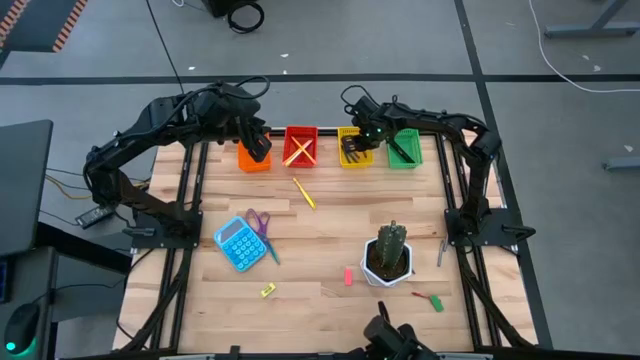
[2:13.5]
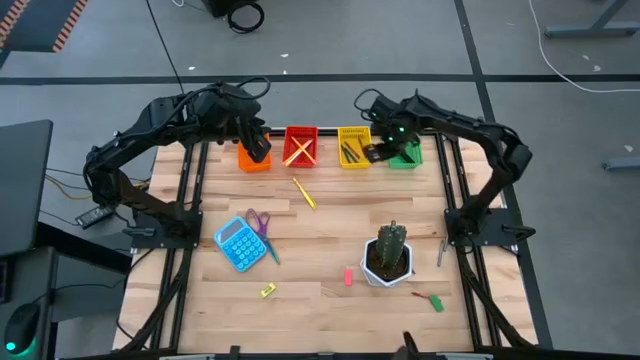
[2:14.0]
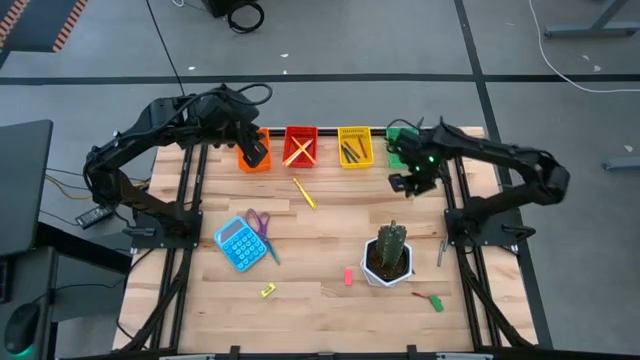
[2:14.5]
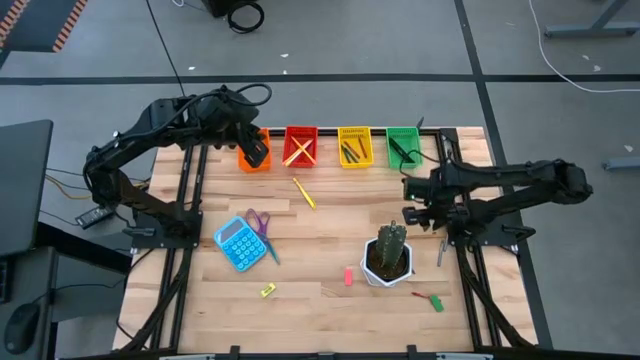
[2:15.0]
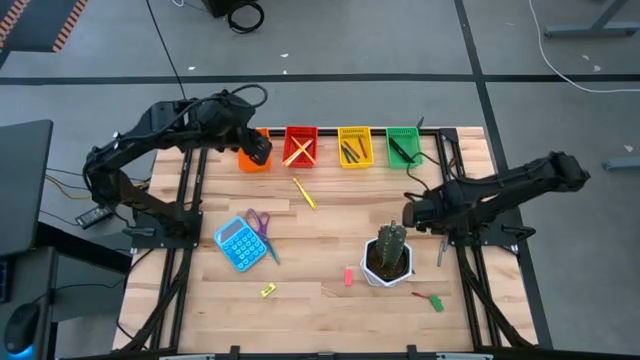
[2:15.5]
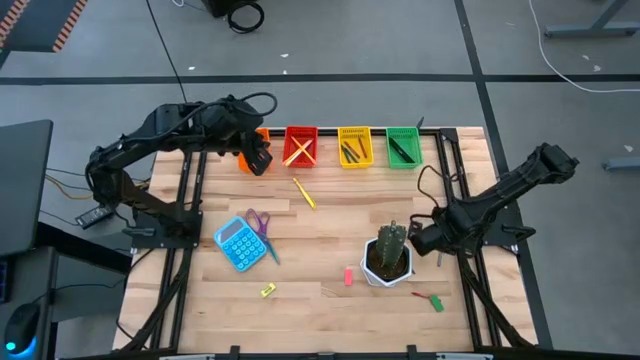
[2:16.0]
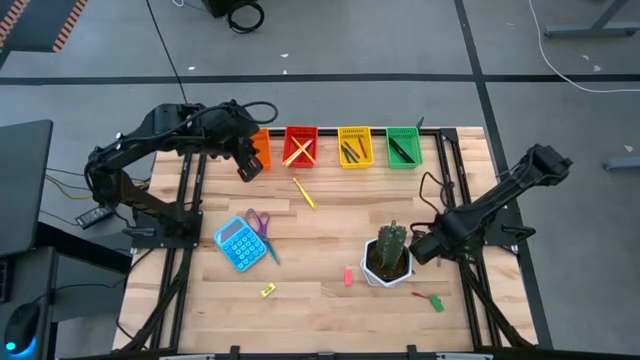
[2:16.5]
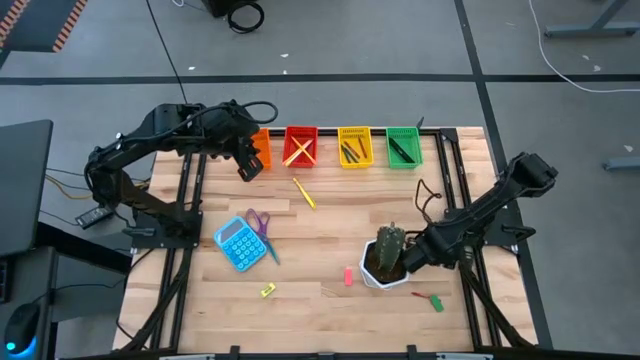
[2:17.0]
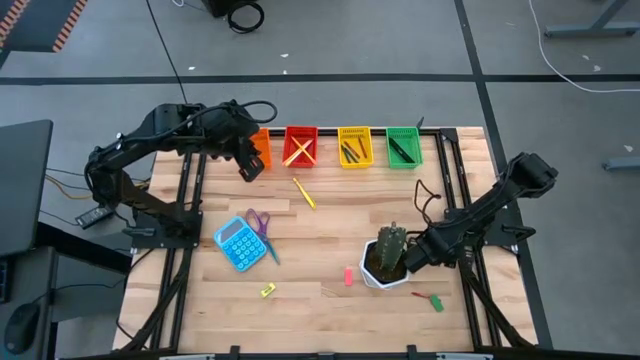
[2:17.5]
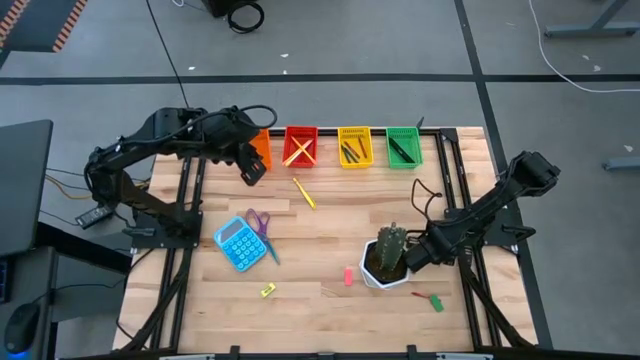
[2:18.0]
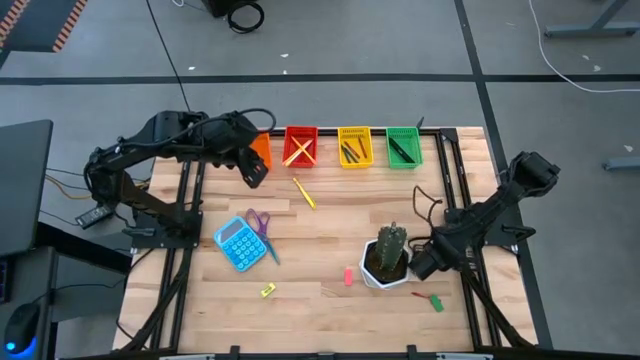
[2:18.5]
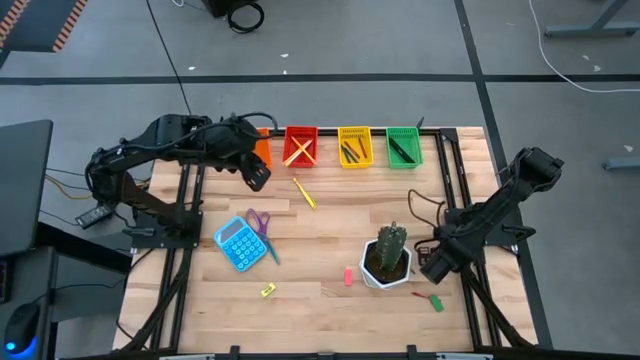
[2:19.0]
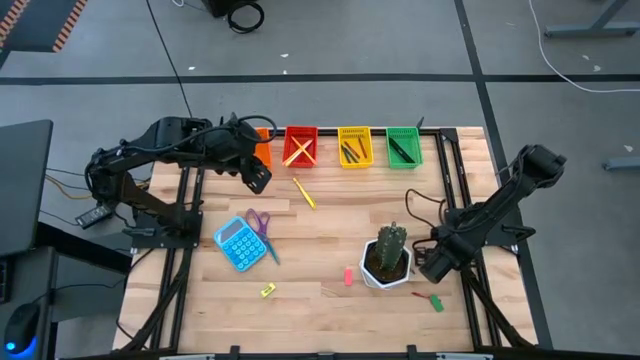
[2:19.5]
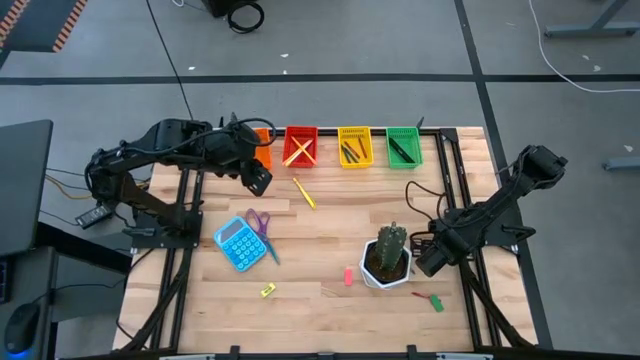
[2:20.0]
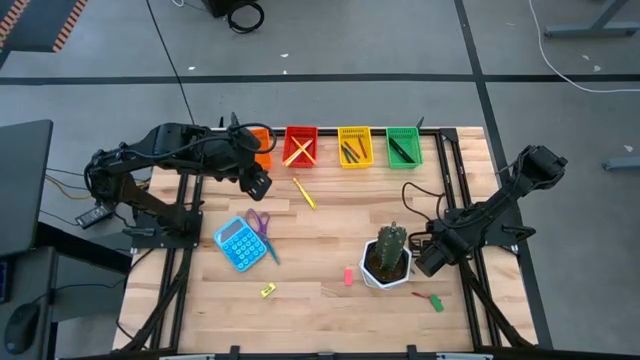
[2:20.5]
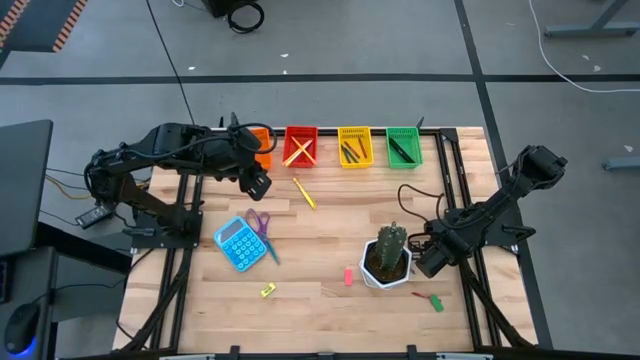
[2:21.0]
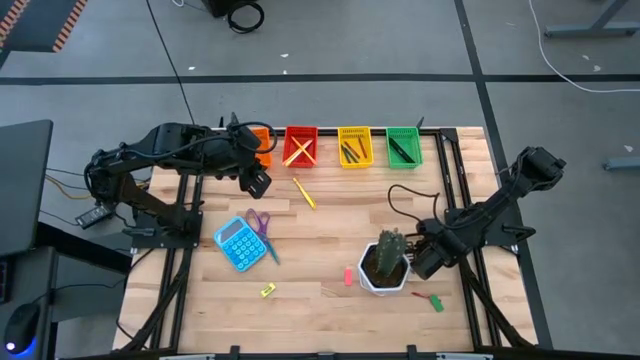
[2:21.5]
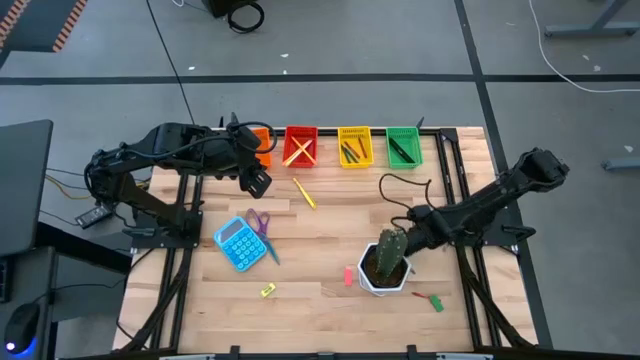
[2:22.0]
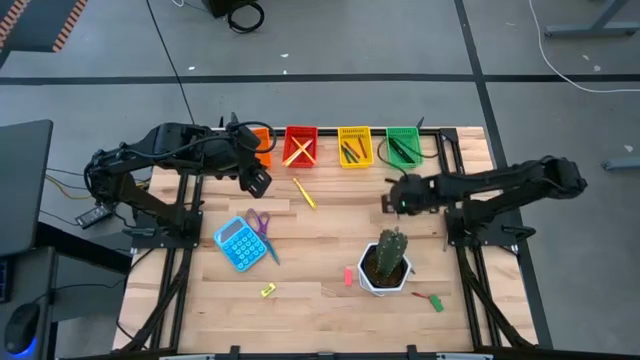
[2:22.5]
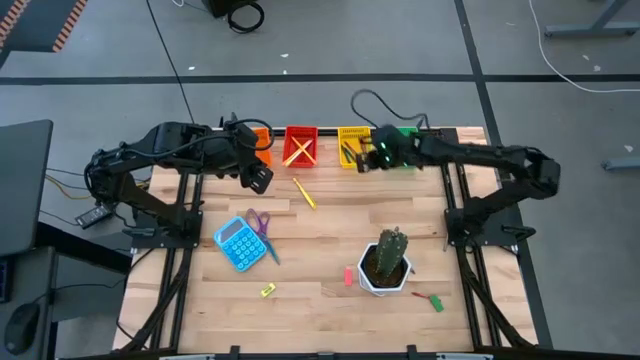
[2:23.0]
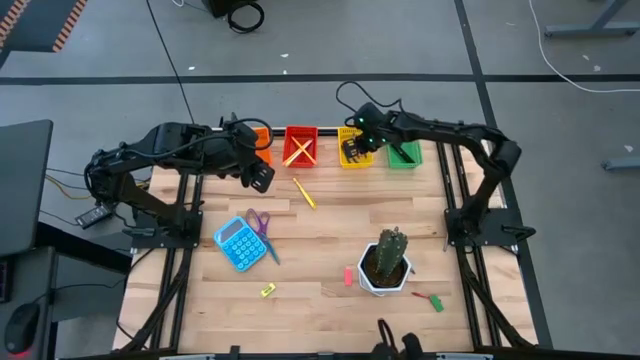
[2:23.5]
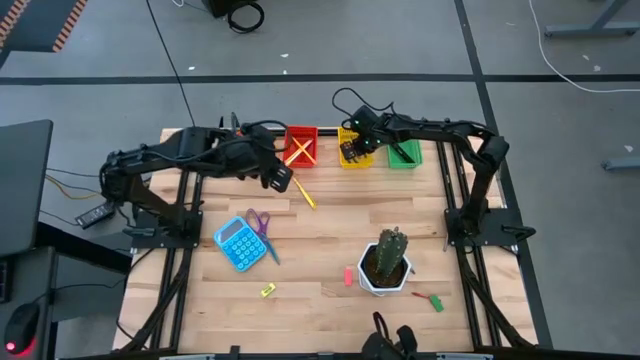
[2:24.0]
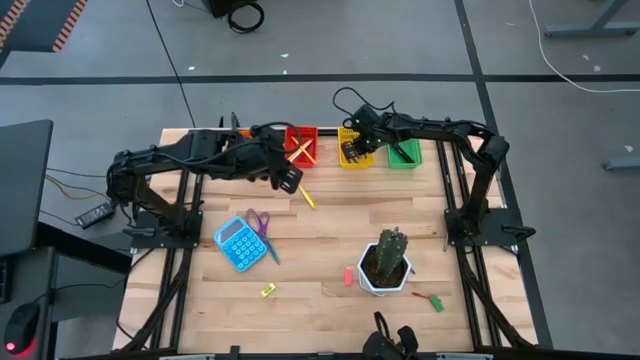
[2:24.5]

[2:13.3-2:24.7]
Task: Sort crayons/erasers/pens/pencils in bins
Put the middle gray crayon into the yellow bin

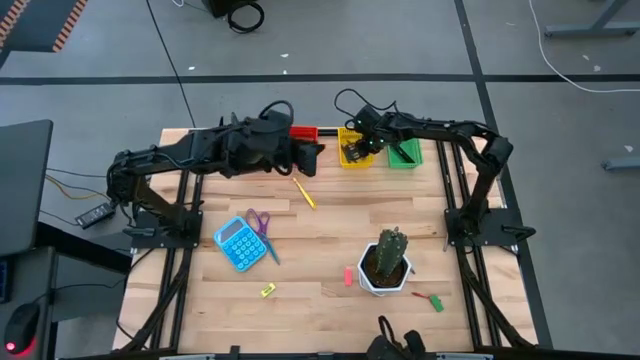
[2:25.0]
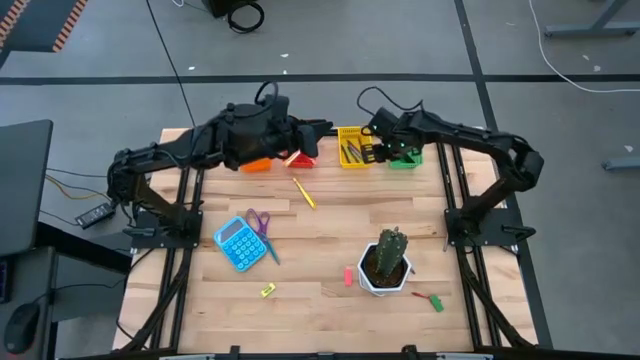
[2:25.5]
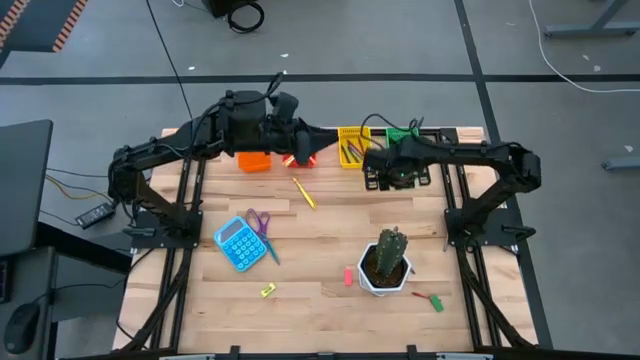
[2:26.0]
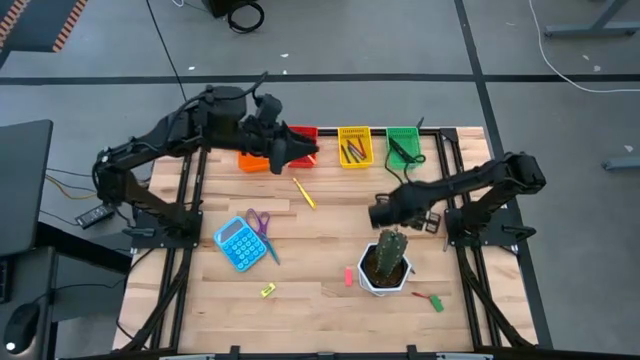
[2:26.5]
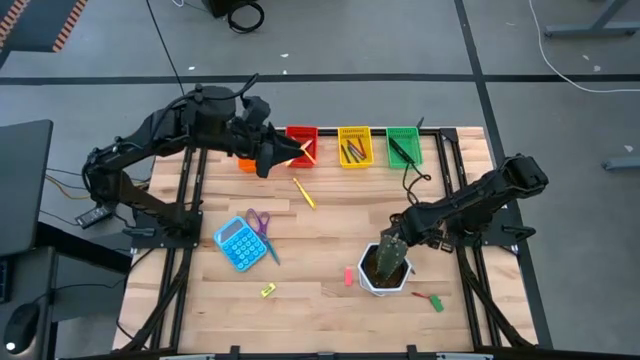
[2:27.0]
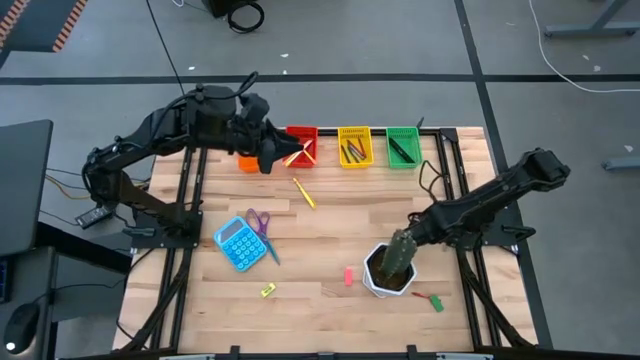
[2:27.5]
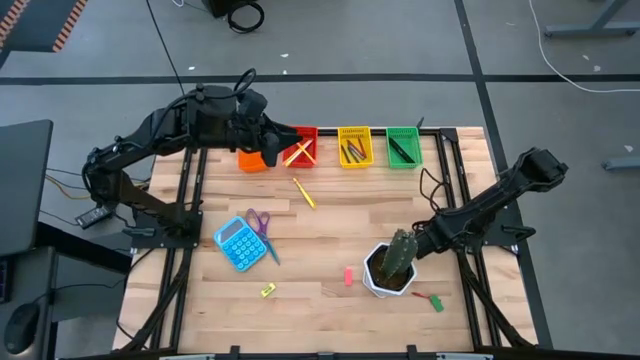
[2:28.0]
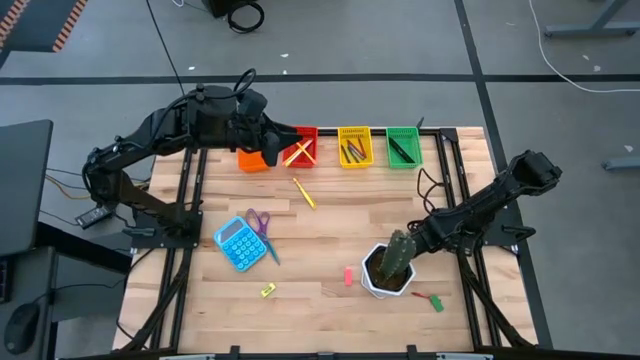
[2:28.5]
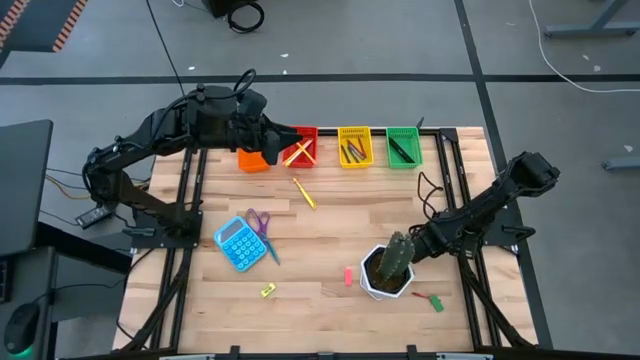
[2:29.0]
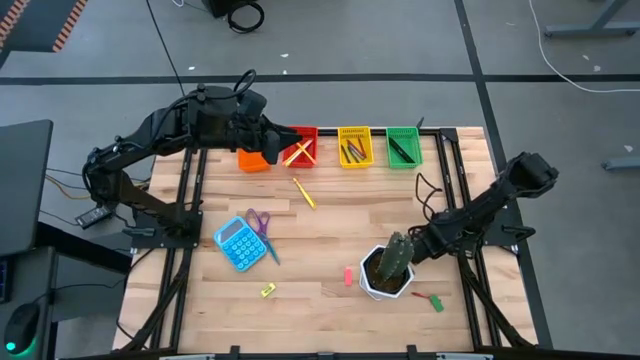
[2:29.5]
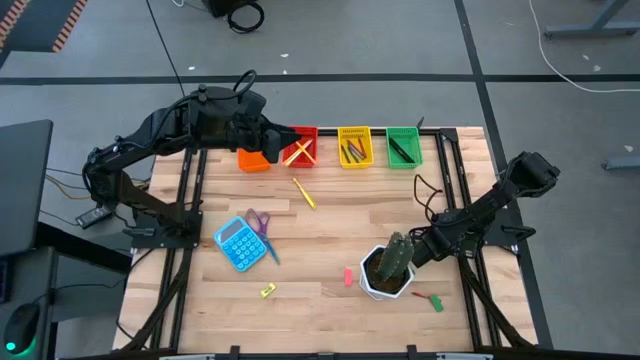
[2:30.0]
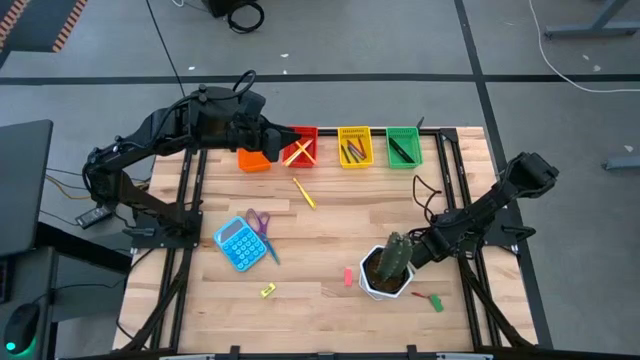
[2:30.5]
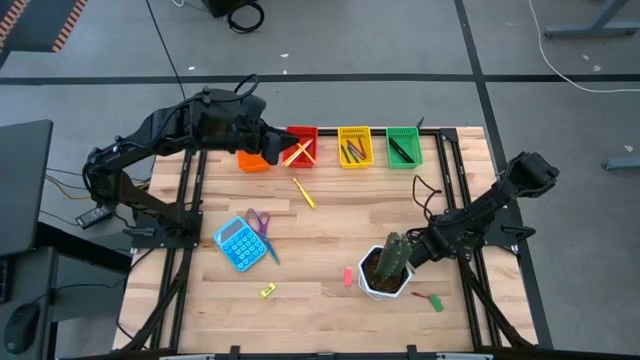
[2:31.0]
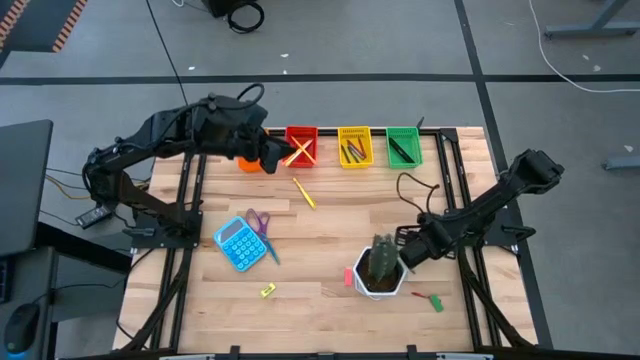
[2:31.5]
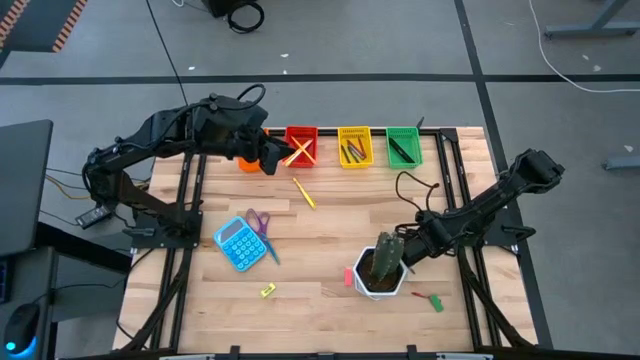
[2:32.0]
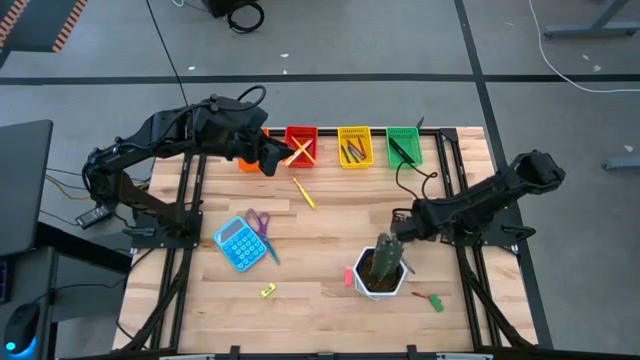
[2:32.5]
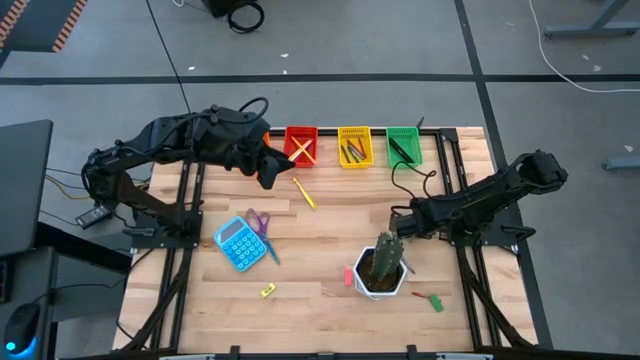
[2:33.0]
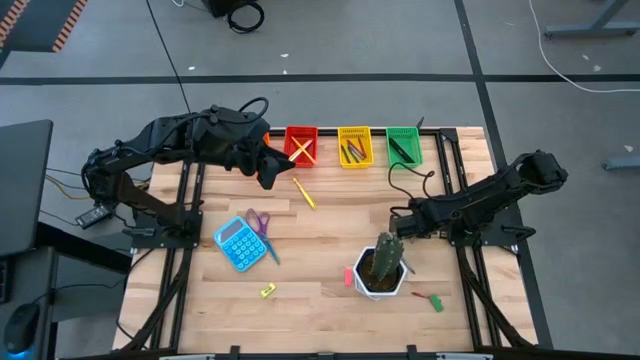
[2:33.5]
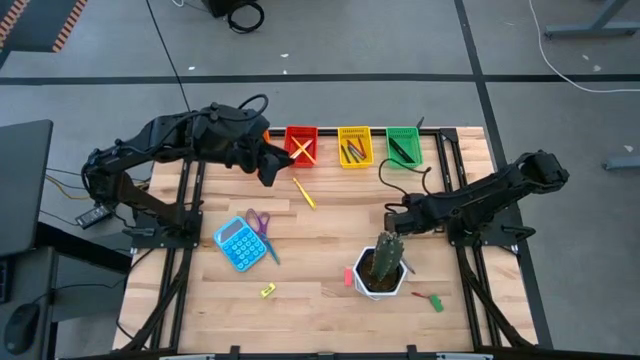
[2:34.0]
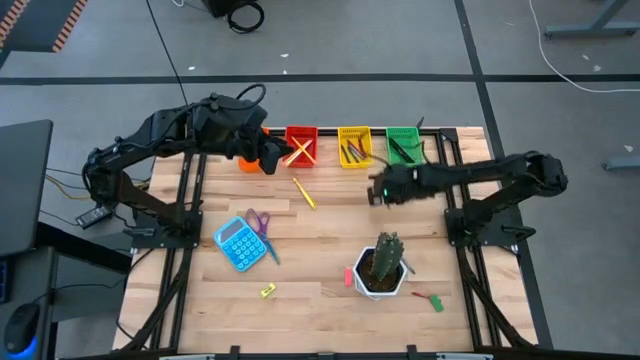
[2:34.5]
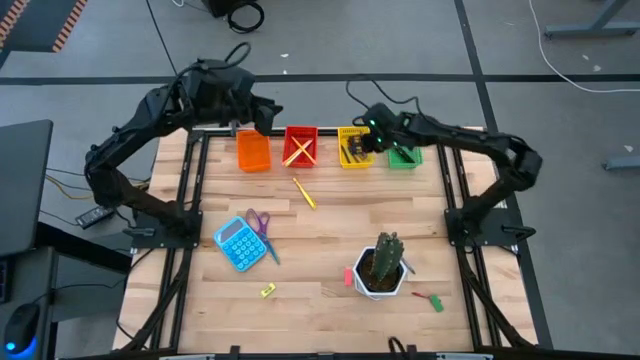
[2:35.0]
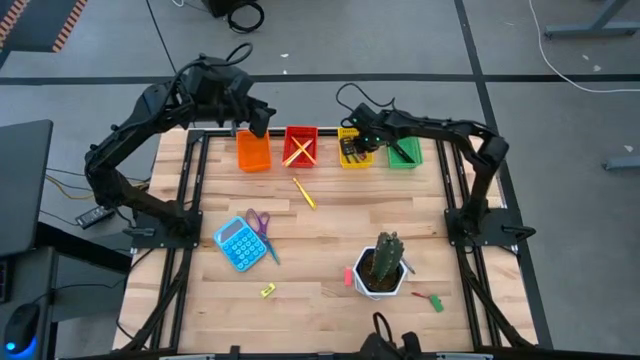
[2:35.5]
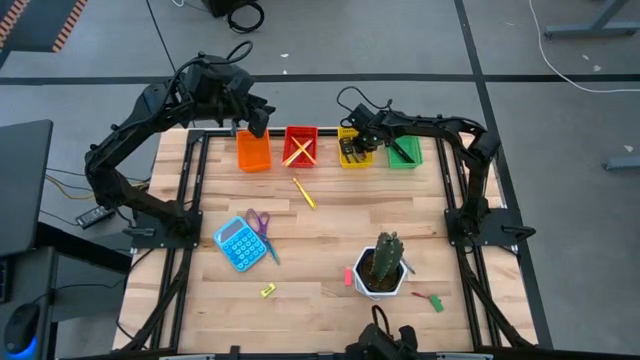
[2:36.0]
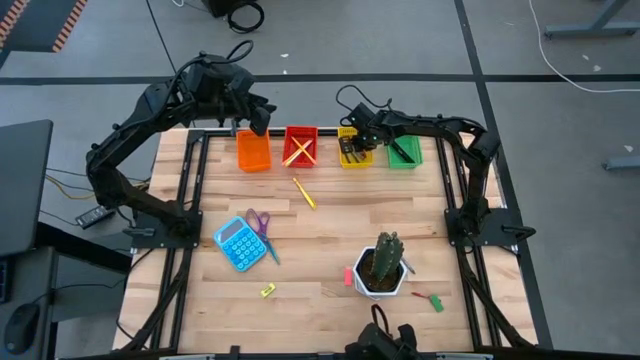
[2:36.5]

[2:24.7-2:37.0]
Put the right gray crayon into the yellow bin
